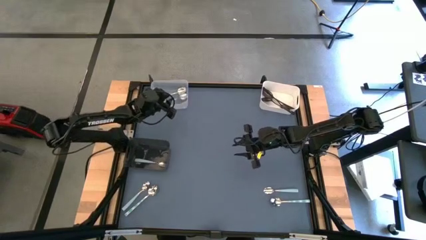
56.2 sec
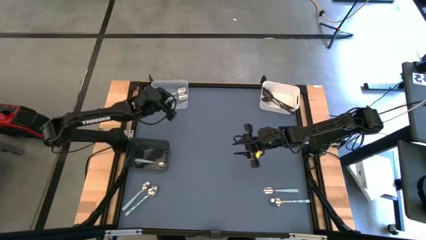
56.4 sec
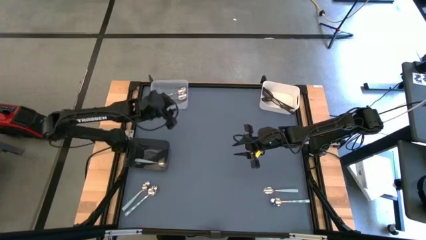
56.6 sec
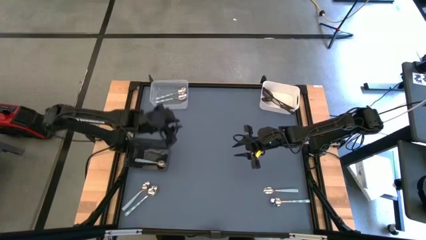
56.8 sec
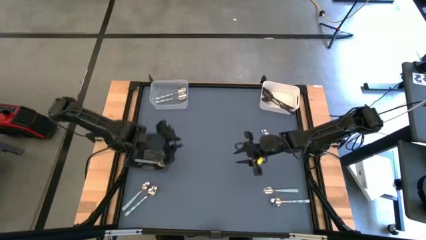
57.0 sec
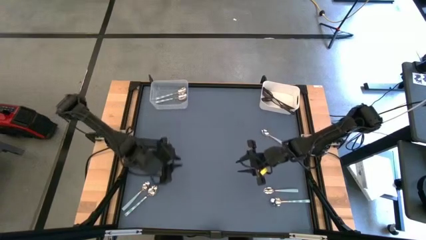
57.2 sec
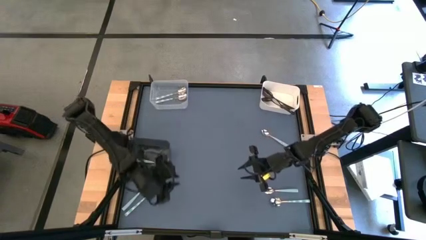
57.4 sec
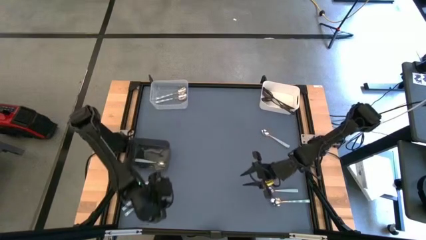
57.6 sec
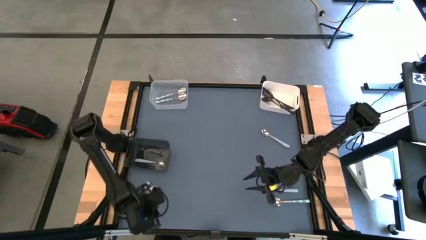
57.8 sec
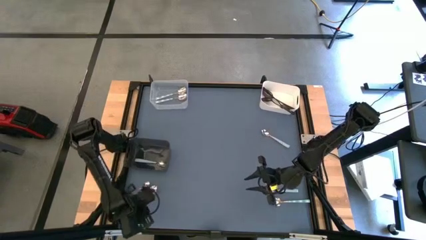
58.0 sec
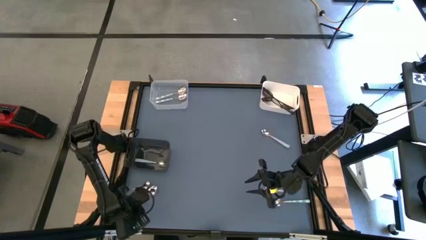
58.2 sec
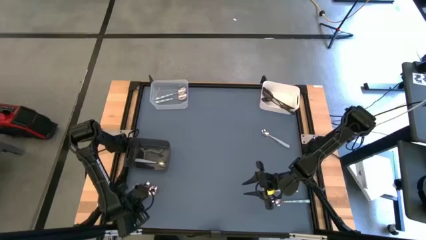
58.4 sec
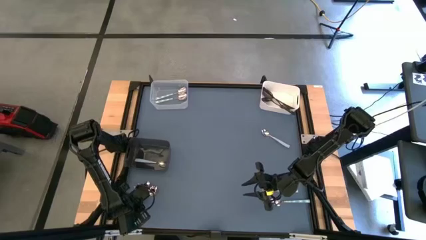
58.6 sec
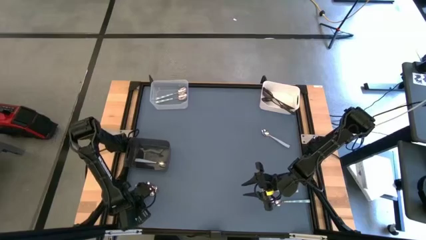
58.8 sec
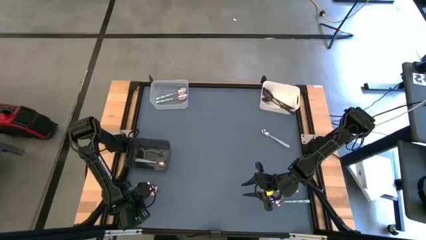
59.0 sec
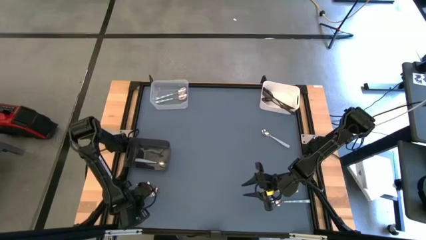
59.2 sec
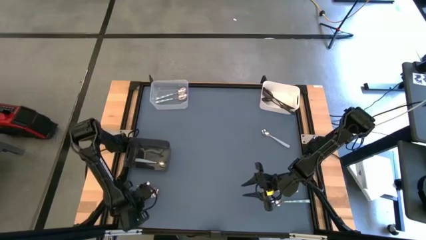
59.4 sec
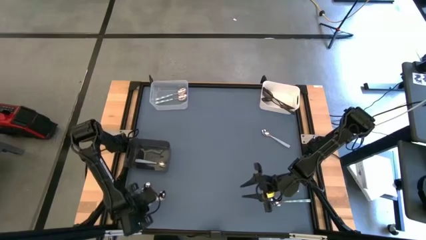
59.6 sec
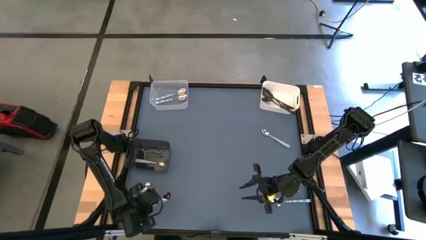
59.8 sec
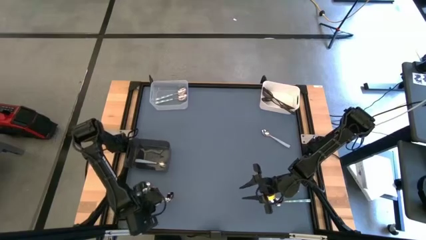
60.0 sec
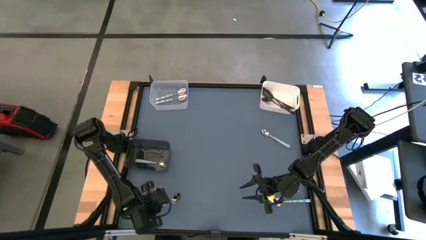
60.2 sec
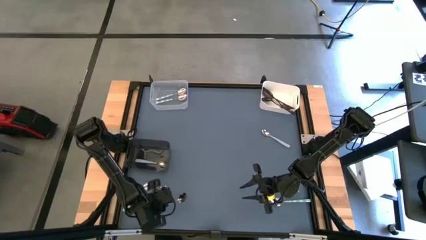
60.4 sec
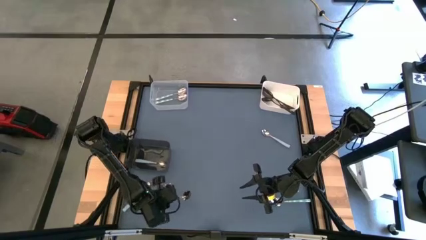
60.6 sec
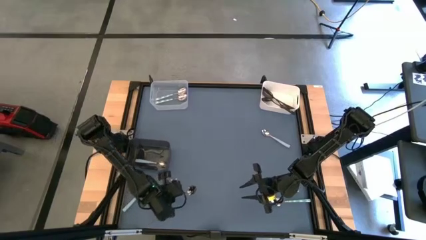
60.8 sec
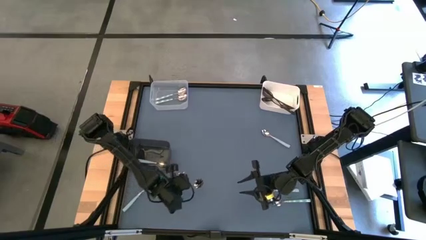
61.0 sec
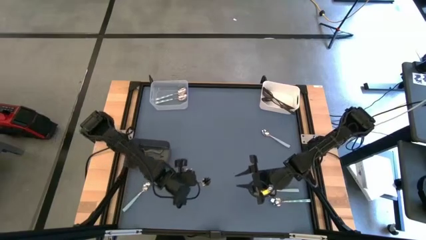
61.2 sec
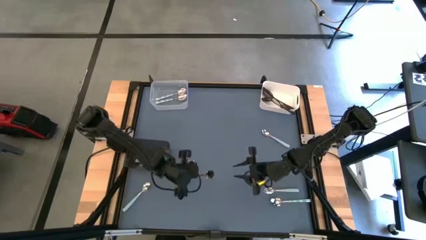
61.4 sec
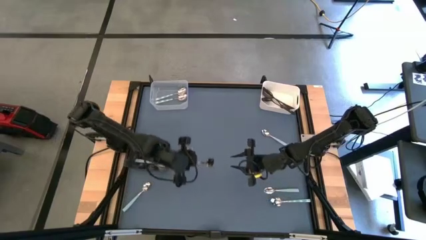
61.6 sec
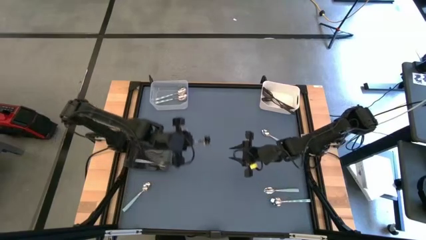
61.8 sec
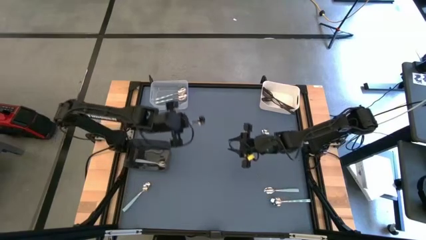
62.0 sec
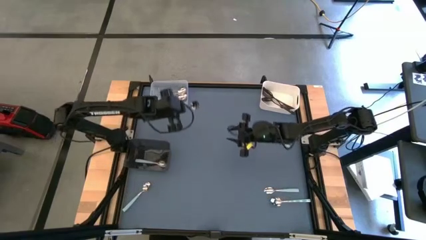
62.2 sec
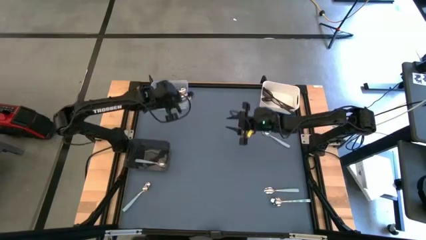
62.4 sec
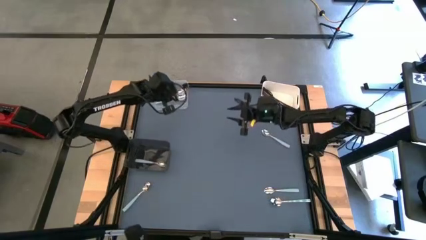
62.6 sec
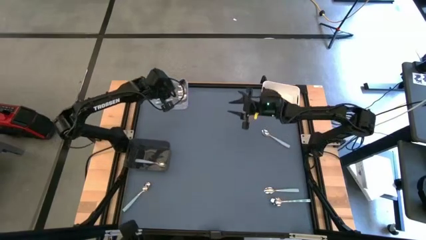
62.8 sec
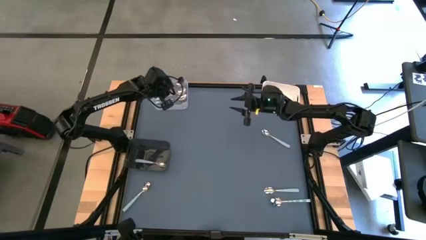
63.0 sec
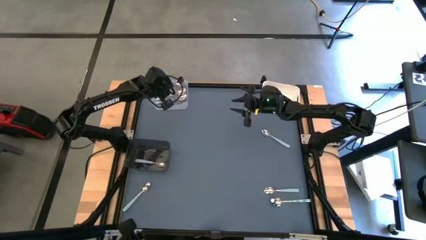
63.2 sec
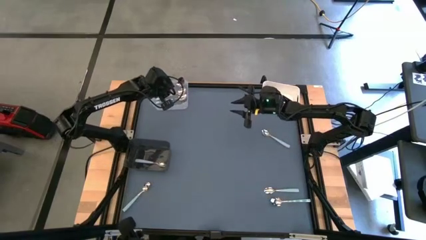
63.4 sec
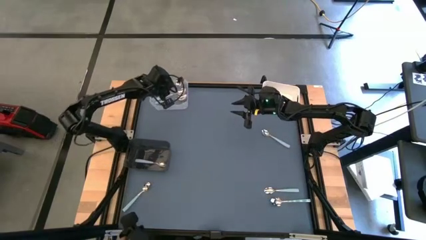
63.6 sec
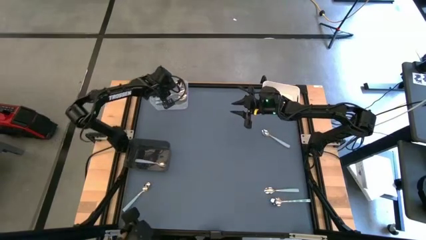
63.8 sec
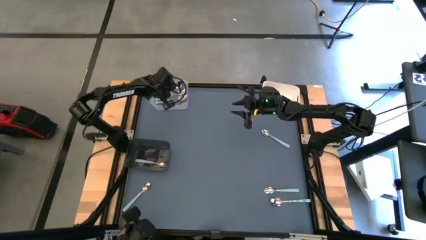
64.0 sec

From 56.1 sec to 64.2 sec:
Task: Sort silverware by color (type)
Put the green spoon into the transparent bin

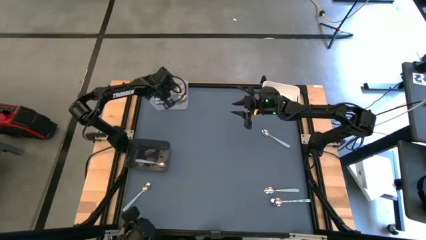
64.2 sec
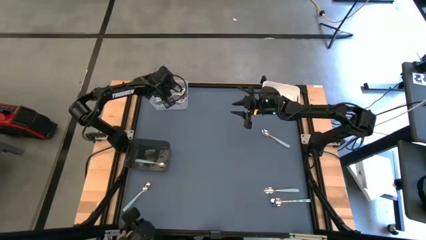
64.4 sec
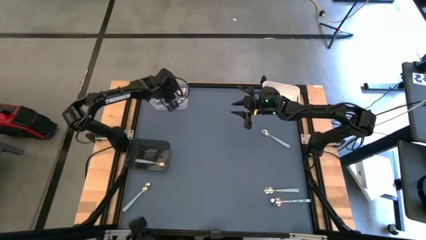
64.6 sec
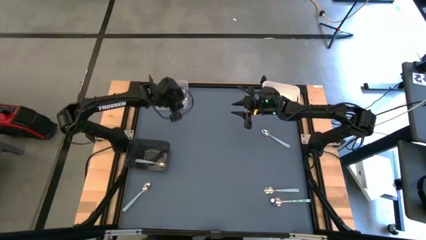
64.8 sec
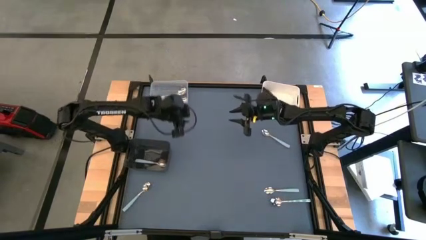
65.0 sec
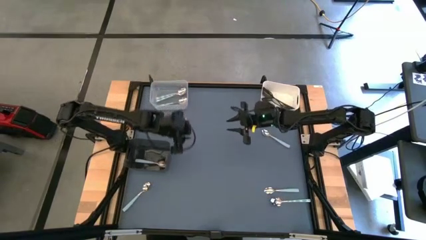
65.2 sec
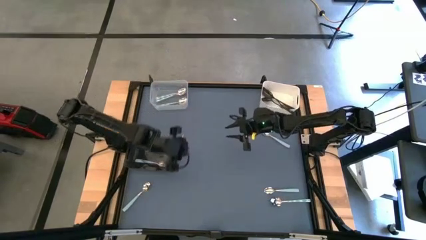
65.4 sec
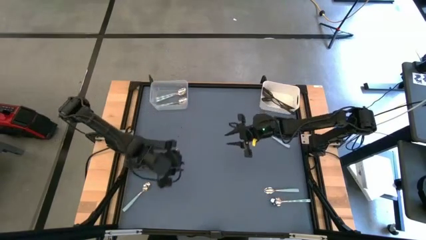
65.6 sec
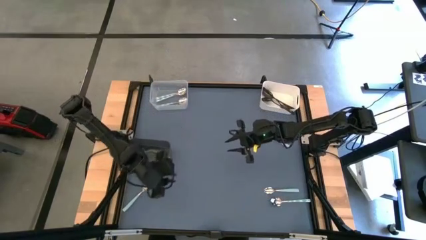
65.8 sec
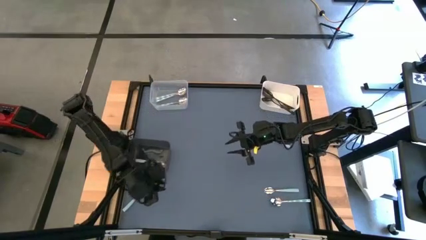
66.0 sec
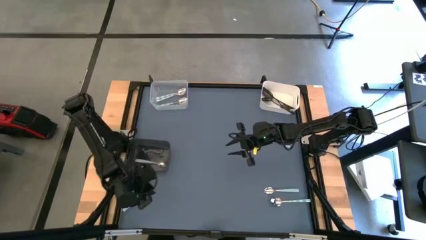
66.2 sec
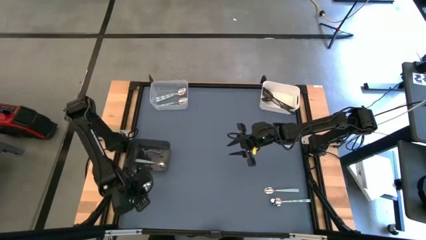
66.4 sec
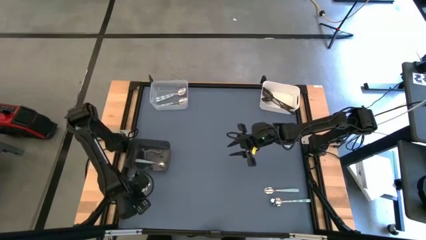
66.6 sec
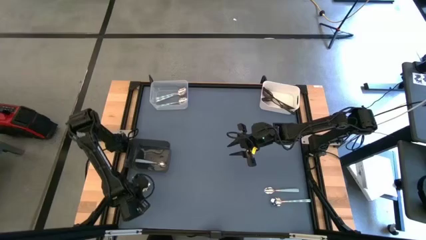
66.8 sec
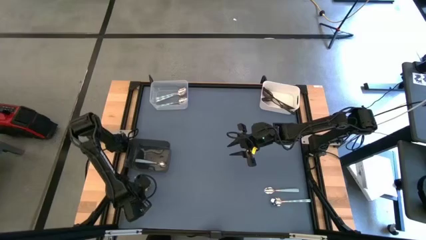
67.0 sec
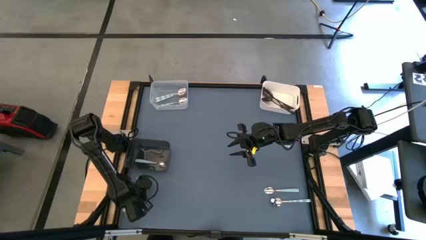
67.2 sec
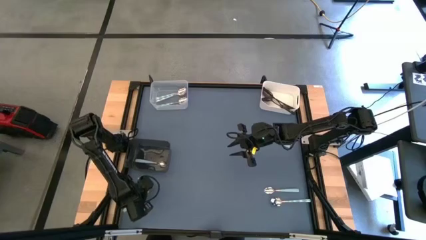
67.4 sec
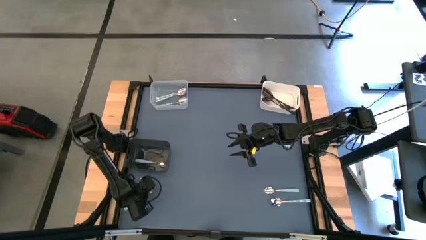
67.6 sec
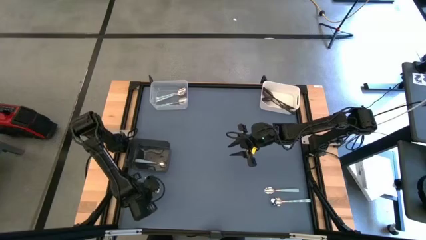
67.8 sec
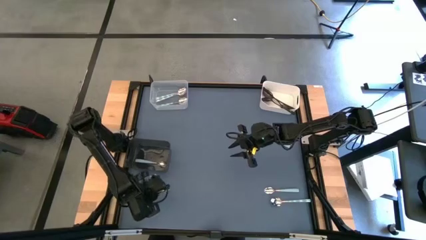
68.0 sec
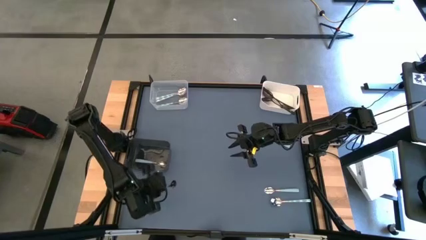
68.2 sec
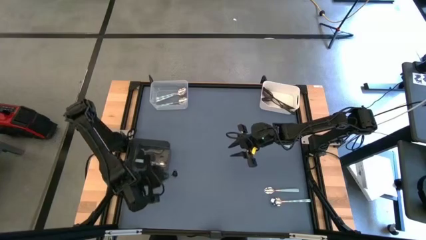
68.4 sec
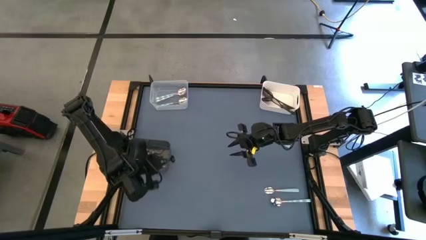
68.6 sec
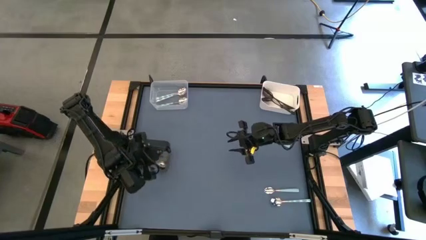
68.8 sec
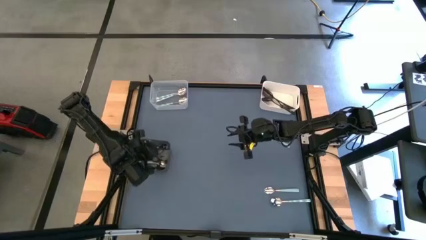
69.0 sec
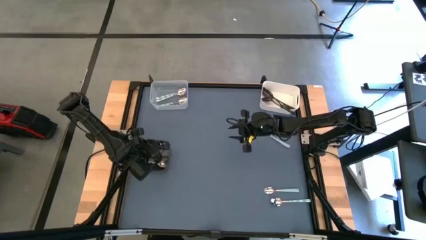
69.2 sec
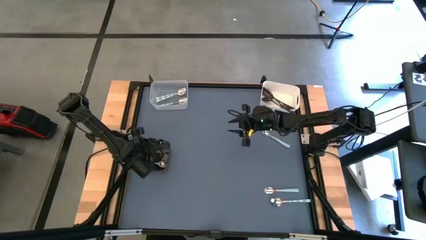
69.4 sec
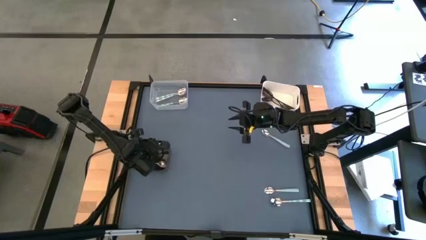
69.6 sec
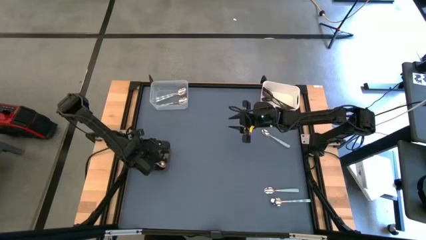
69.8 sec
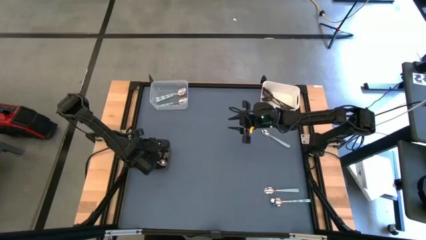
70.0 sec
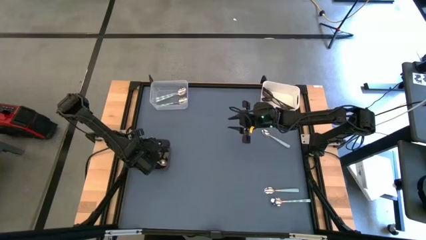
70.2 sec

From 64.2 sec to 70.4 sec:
Put the blue spoon into the black bin

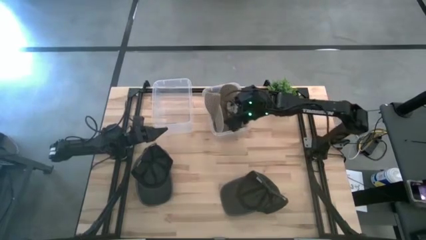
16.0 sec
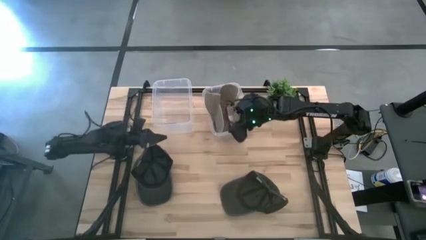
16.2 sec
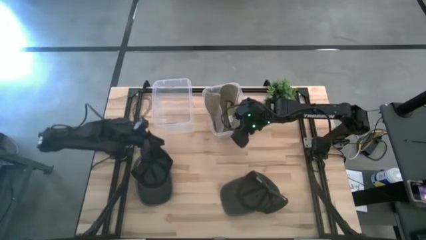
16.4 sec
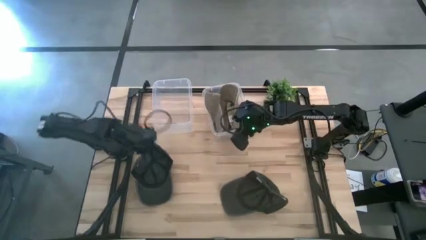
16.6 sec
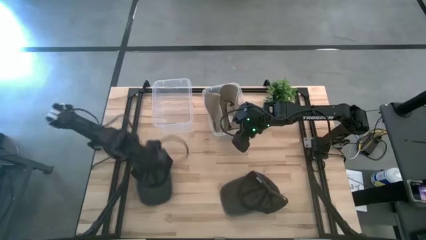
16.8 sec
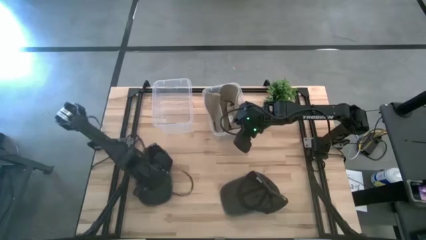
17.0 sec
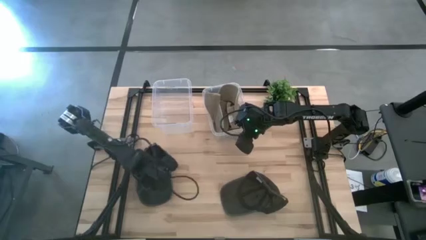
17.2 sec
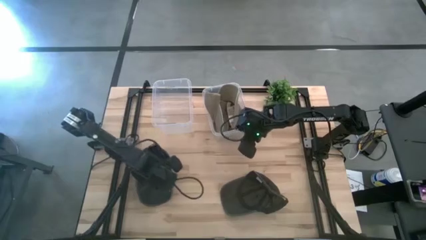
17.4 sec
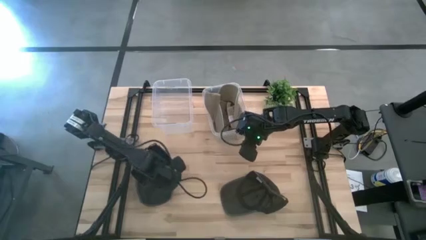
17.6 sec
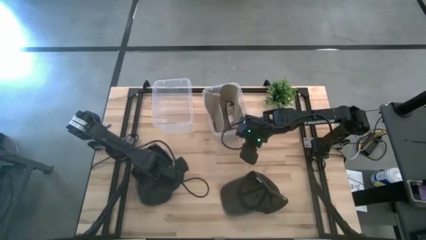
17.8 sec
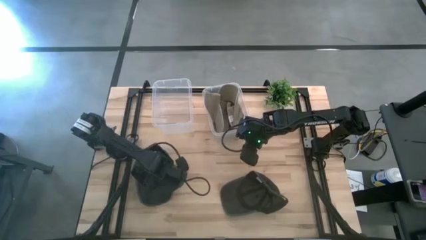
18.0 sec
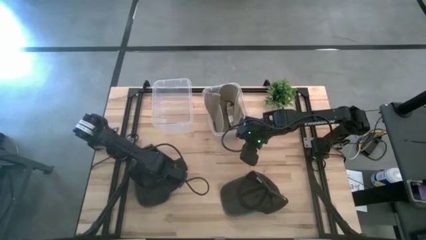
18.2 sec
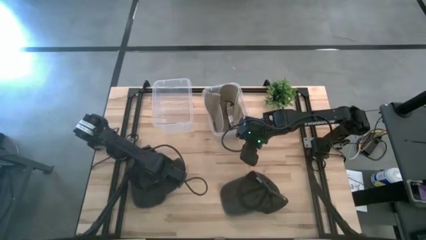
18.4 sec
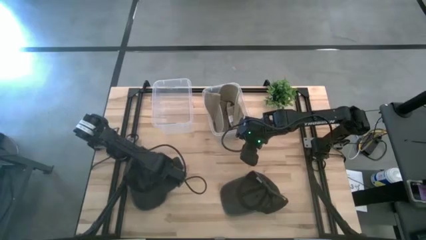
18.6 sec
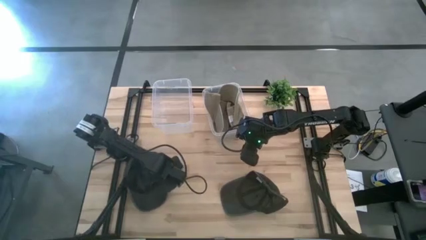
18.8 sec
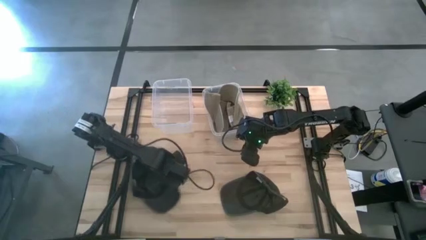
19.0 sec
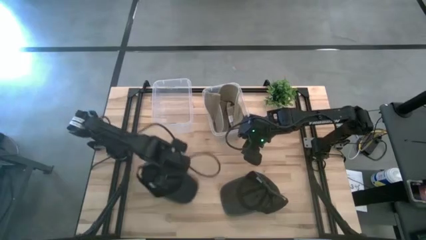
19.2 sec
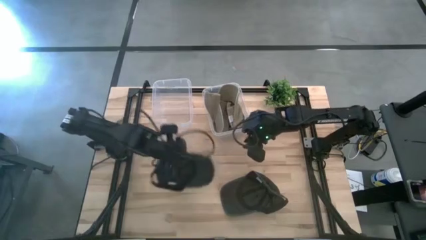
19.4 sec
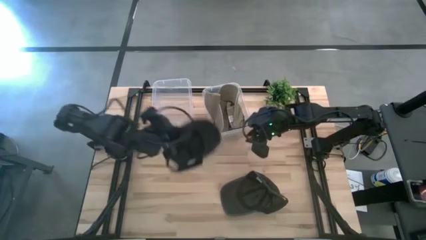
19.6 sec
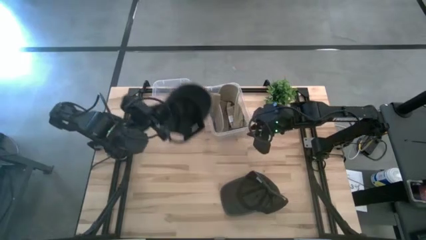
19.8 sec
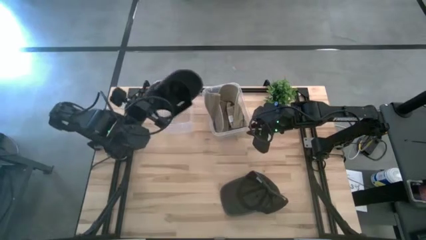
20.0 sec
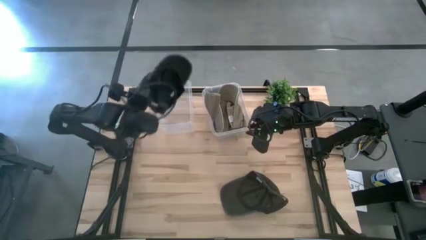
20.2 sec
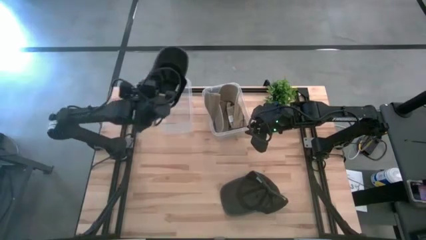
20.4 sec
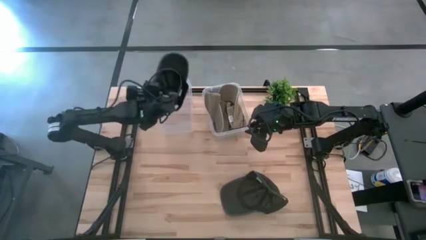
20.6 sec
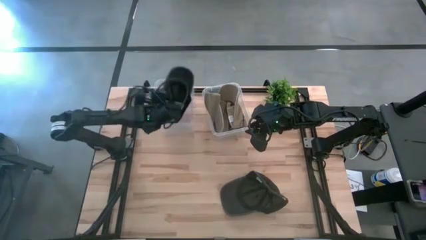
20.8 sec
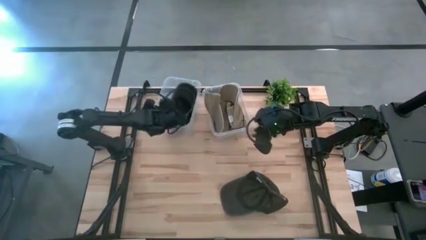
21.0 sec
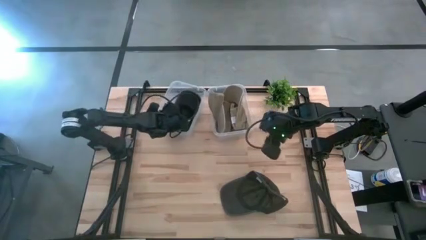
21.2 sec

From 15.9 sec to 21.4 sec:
Task: Pick & Place hat
Put the left black cap into the left transparent bin
